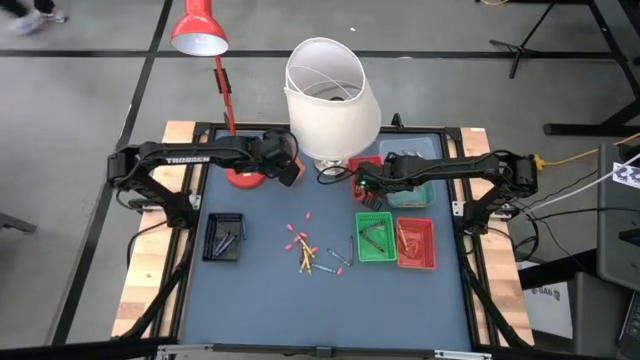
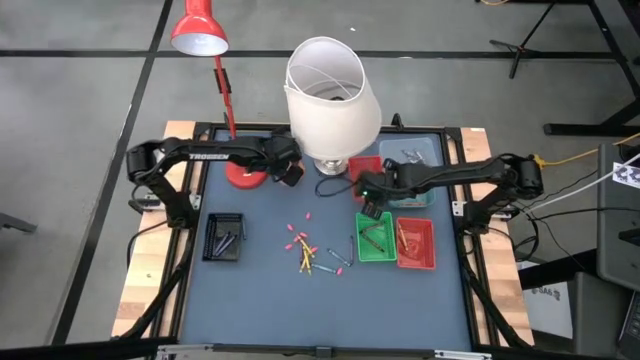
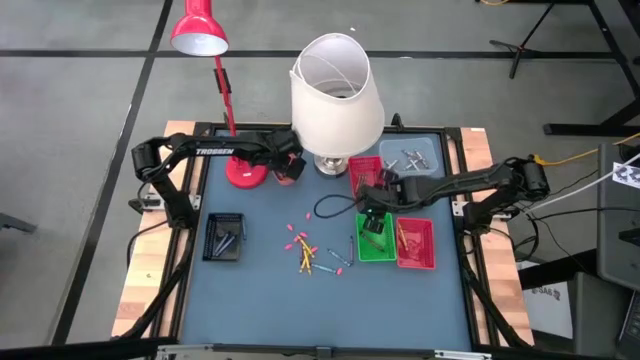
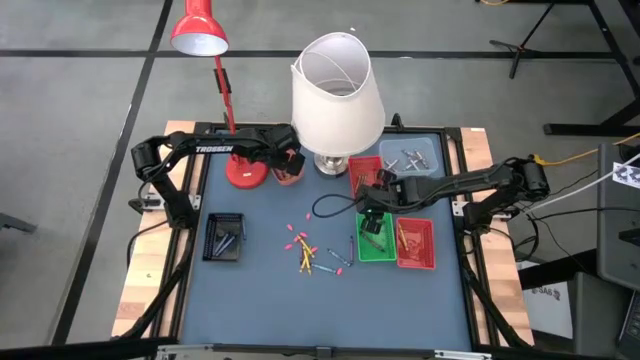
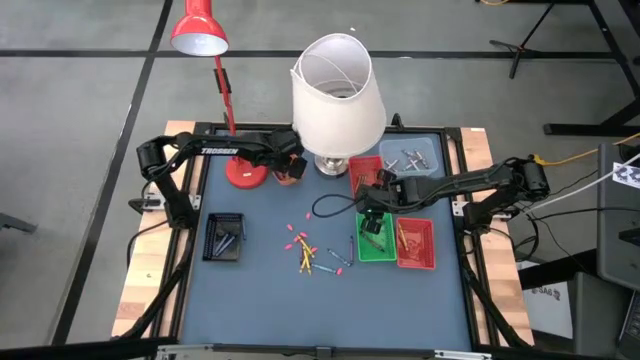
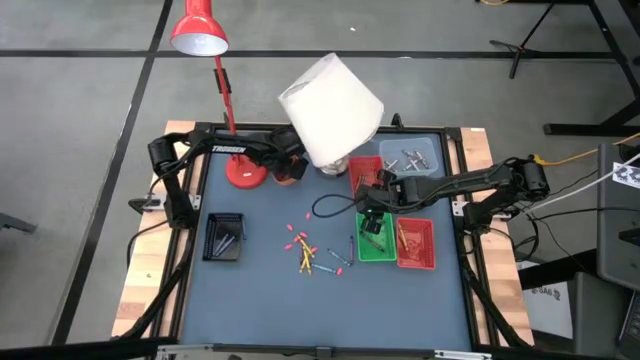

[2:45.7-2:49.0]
Task: Sort crayons
Adjust the violet crayons in the orange bin

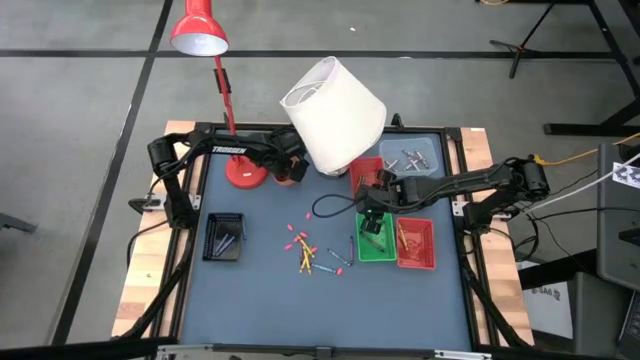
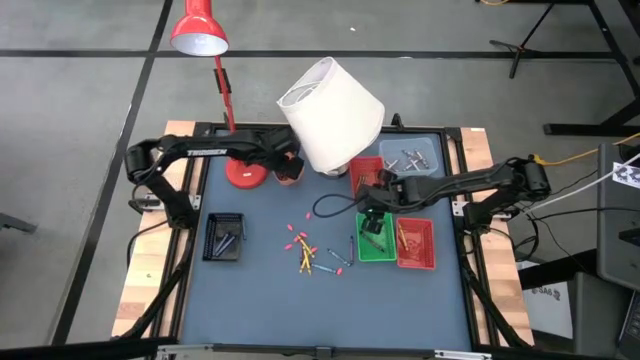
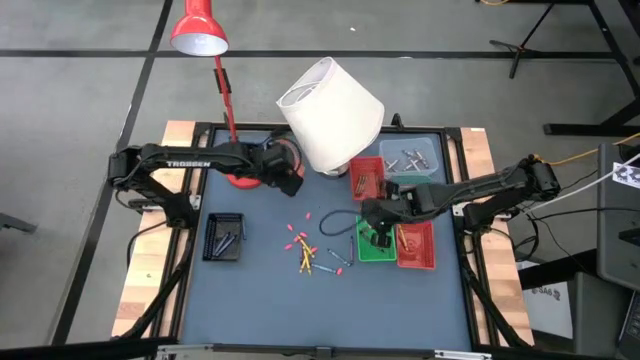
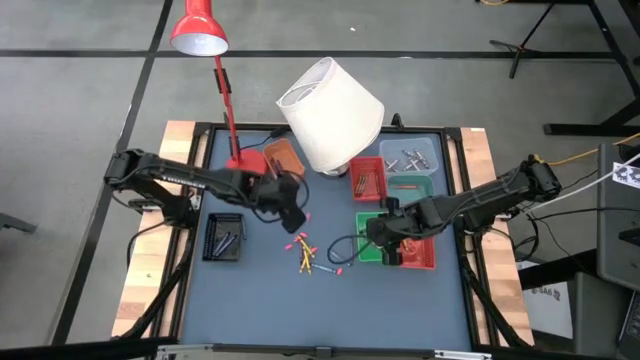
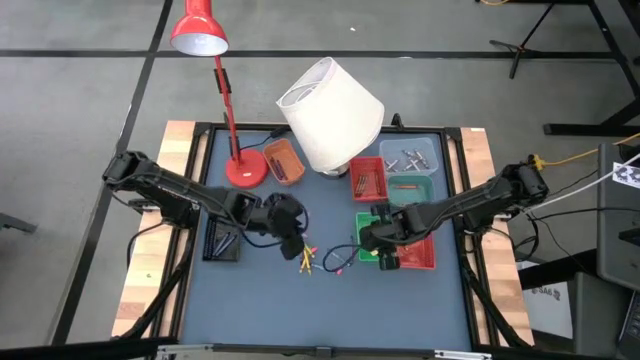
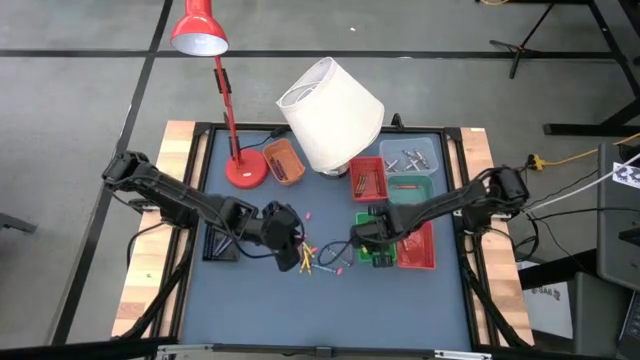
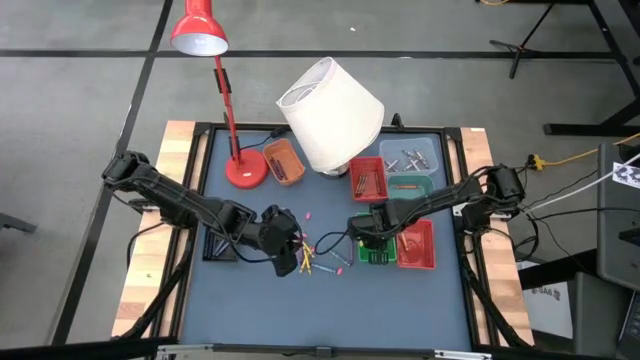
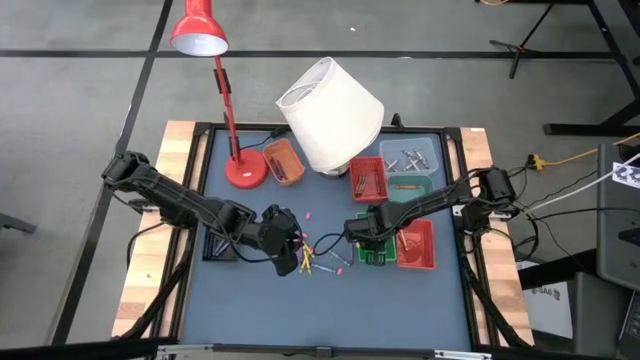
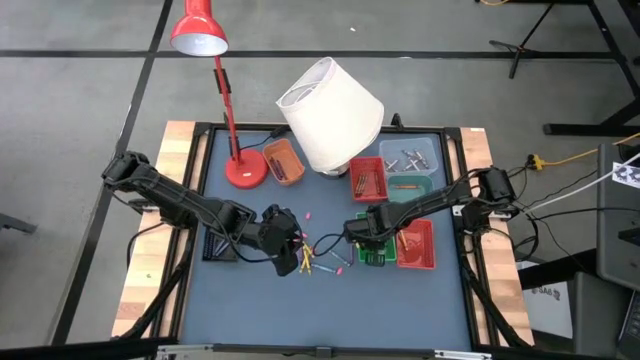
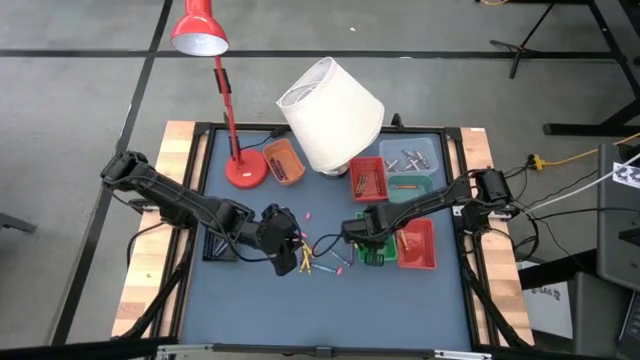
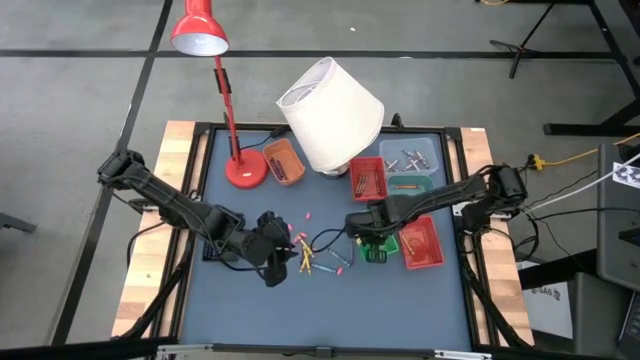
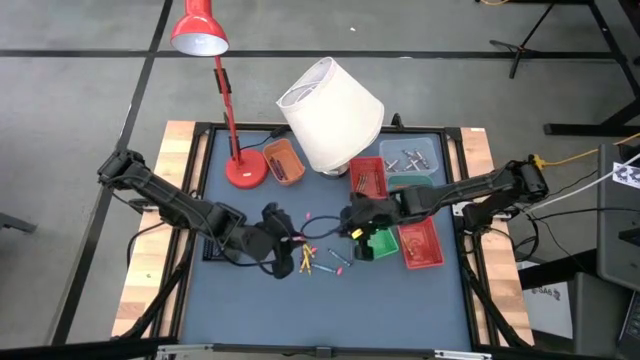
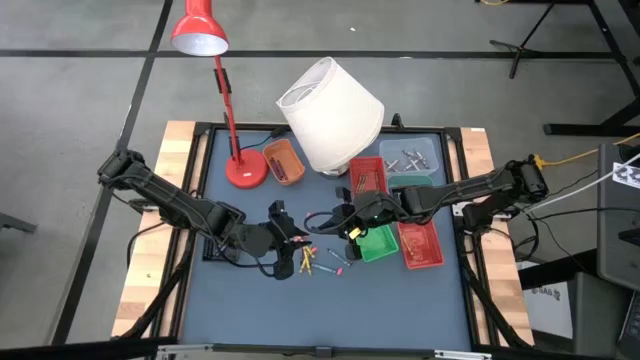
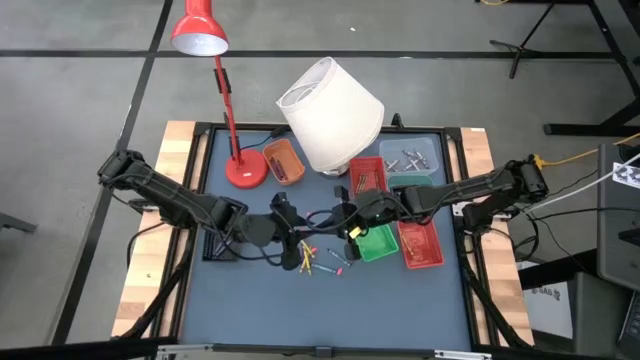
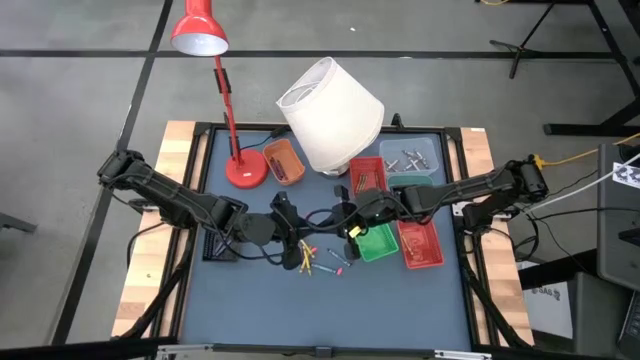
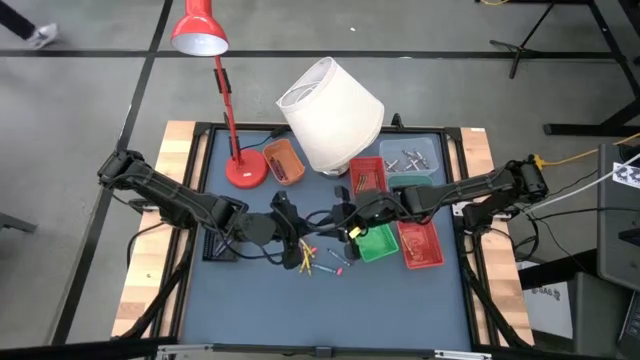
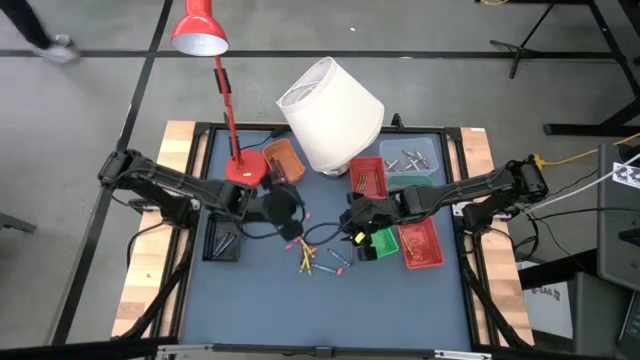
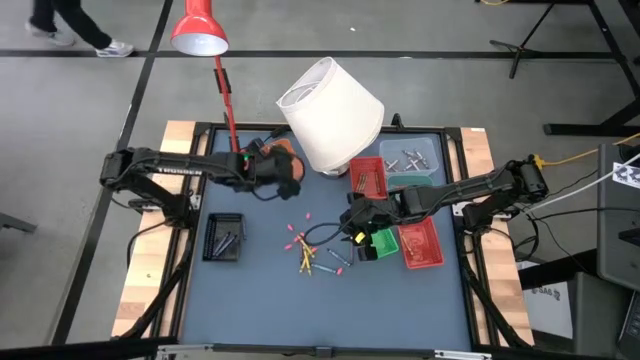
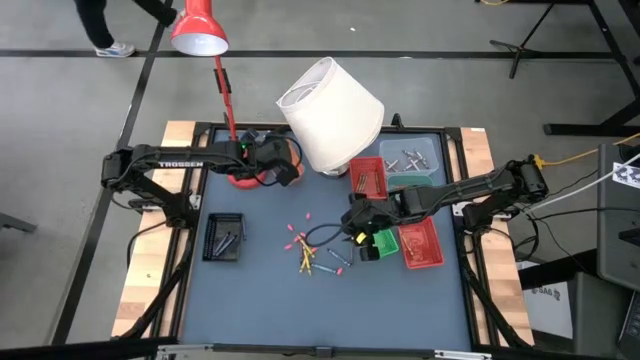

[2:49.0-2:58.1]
Put the violet crayon into the orange bin

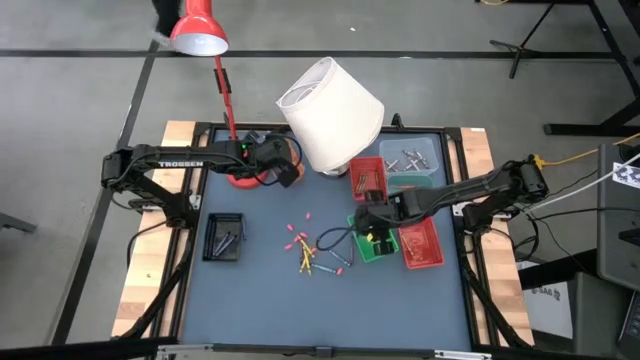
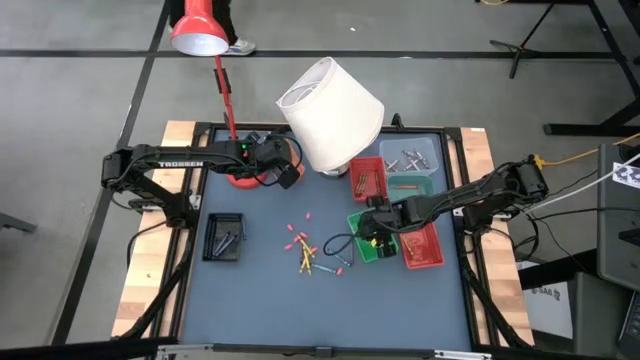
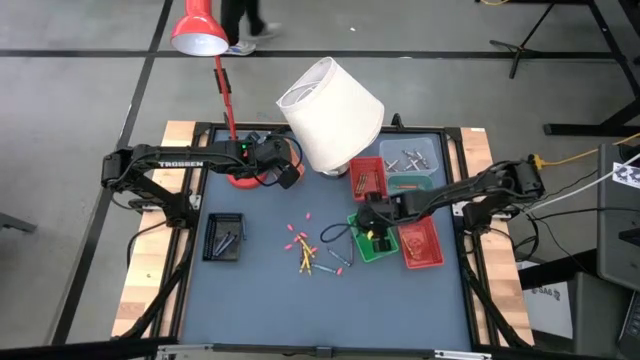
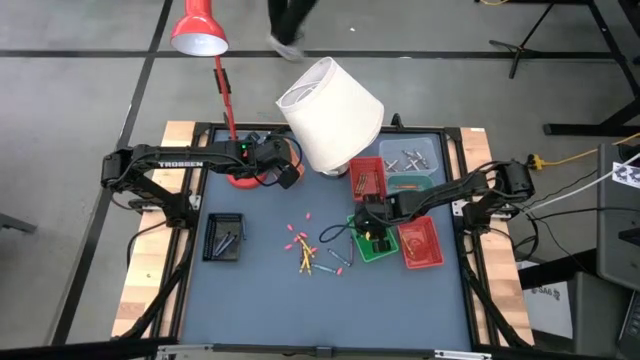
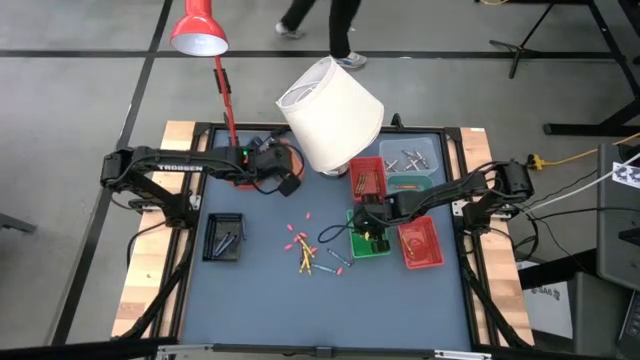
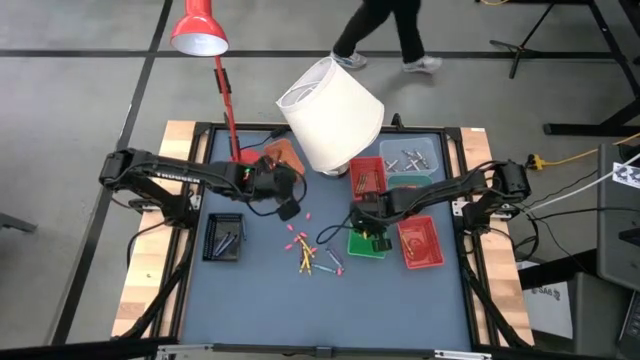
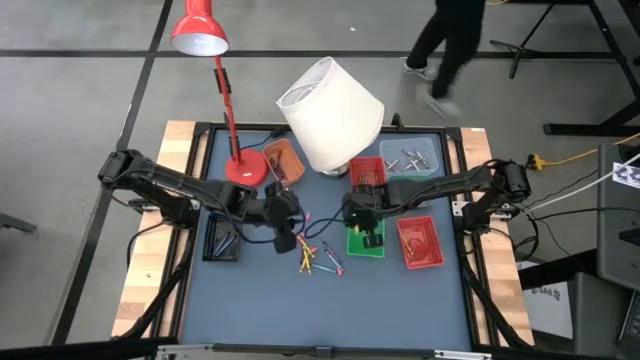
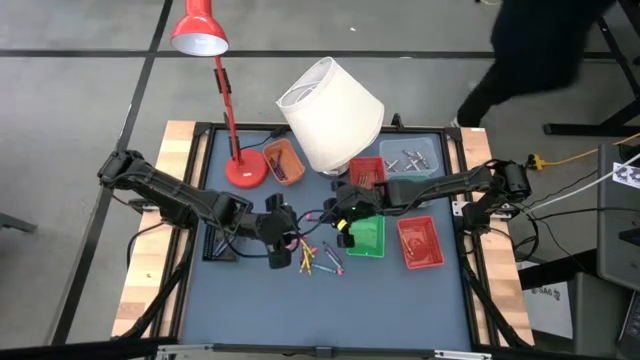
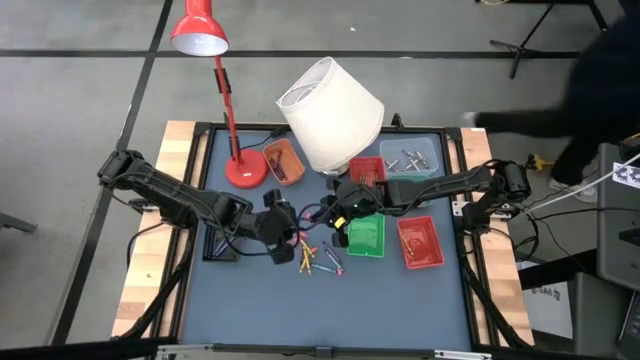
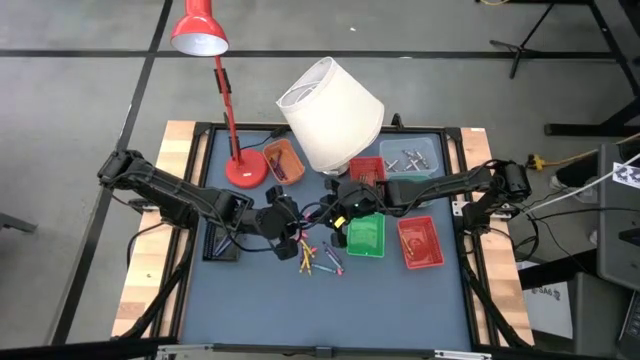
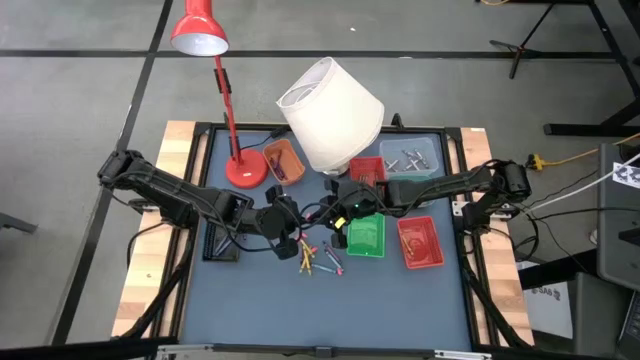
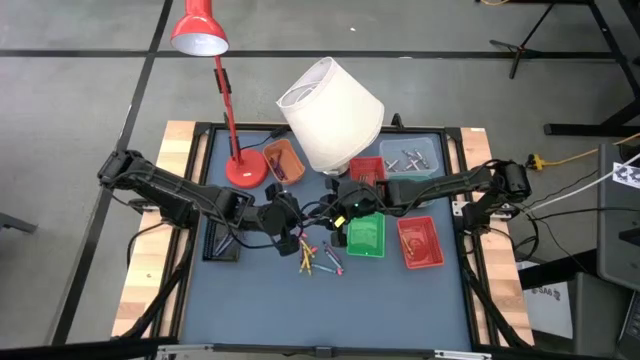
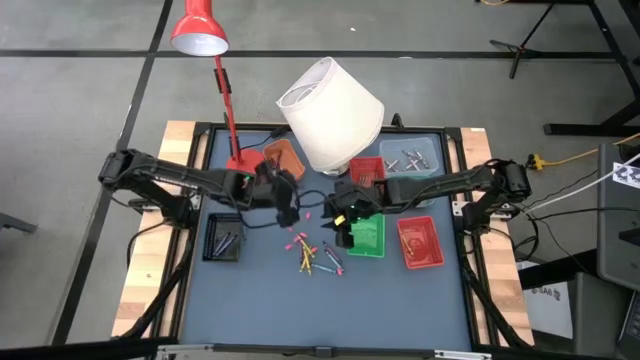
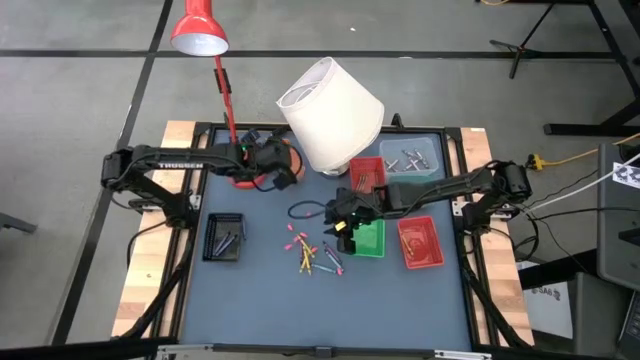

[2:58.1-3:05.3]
Put the violet crayon into the orange bin

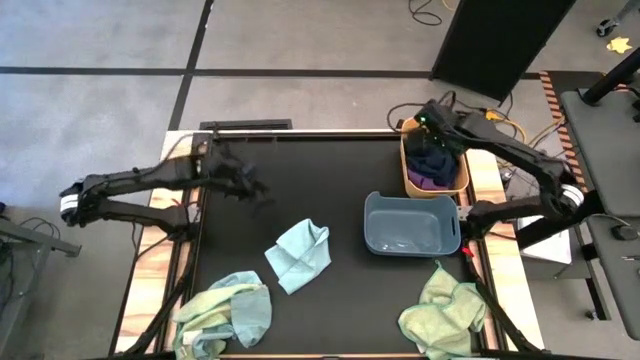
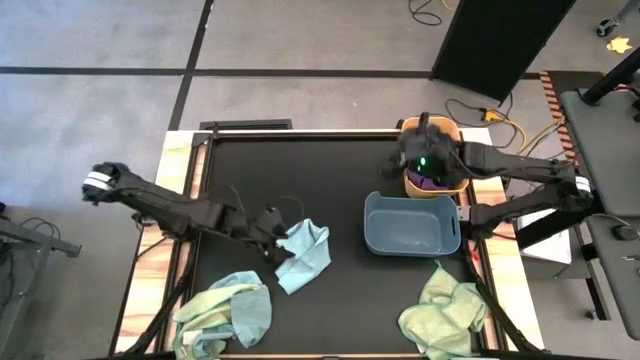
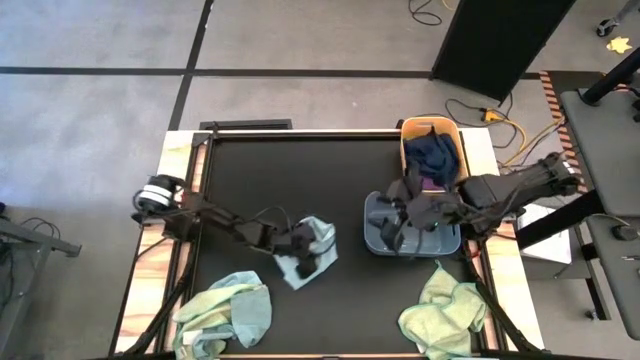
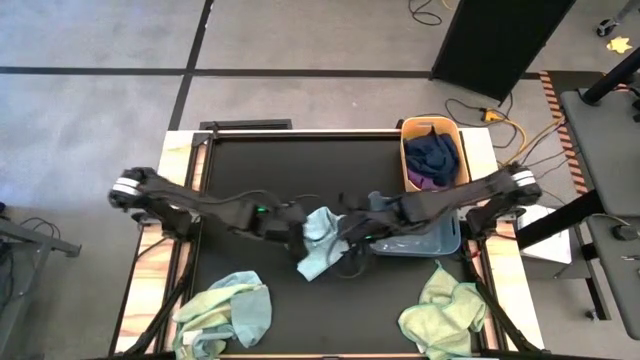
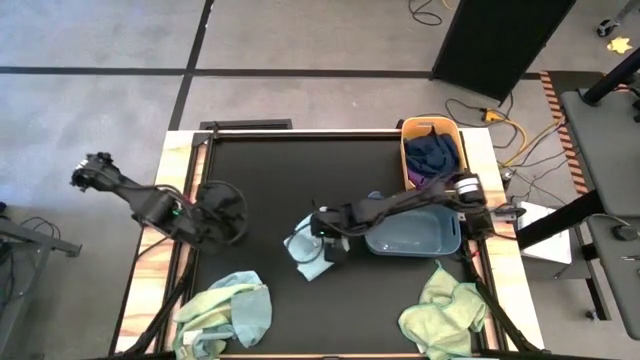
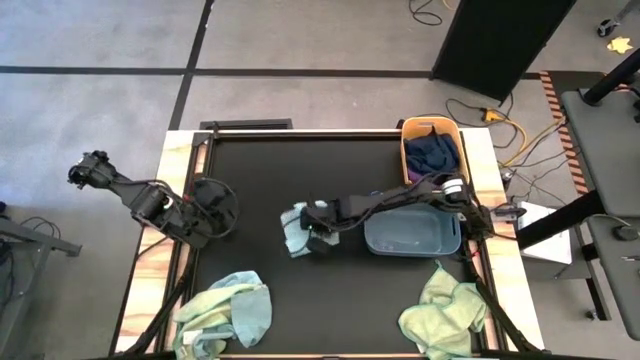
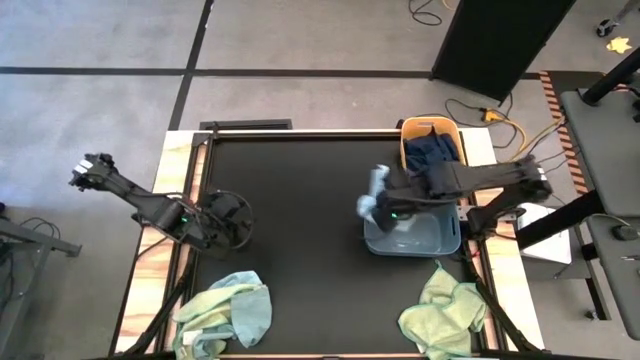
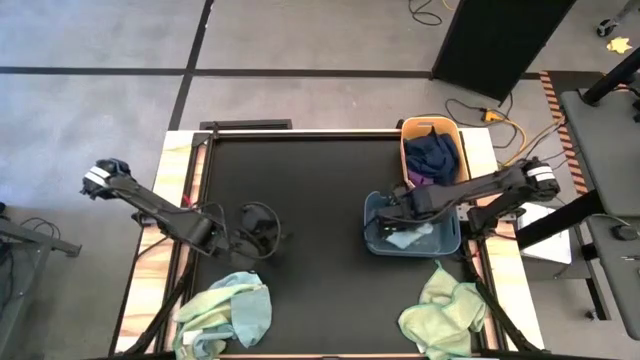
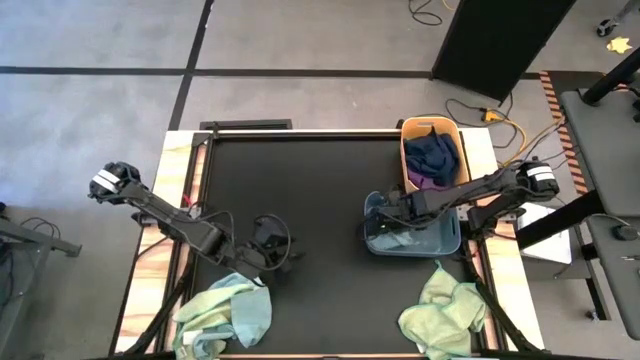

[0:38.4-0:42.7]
Task: Sort towels by color in basket
Put the right light blue towel into the gray bin
